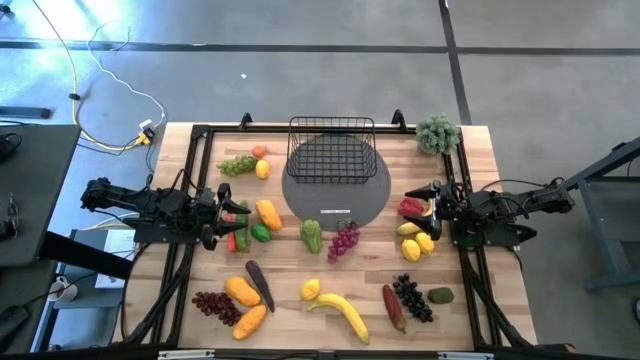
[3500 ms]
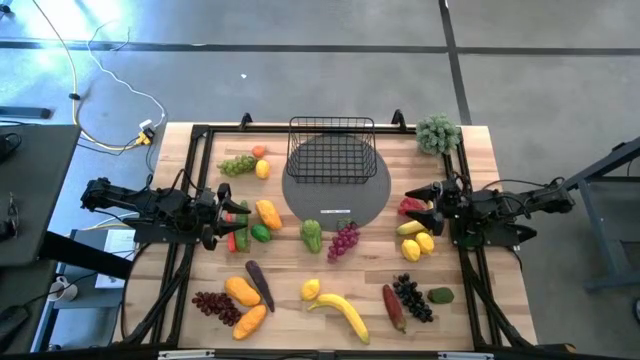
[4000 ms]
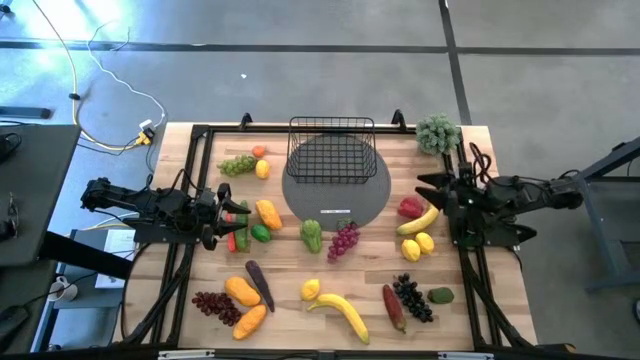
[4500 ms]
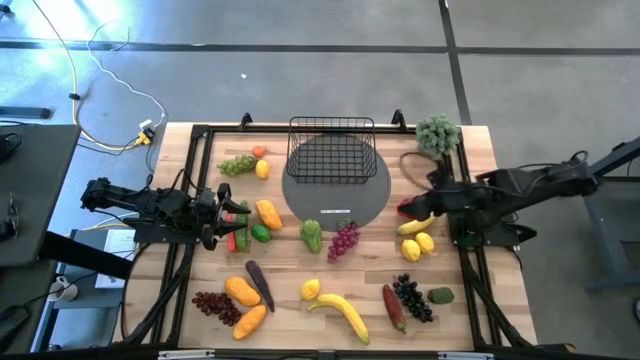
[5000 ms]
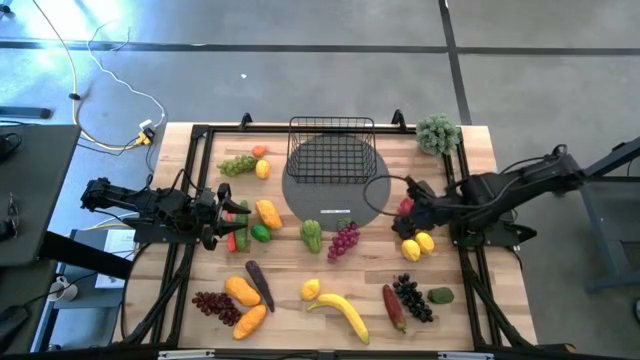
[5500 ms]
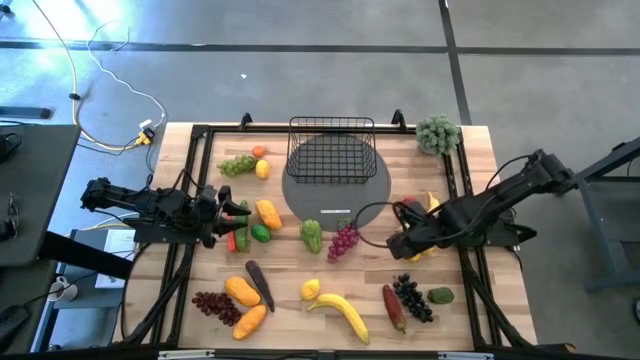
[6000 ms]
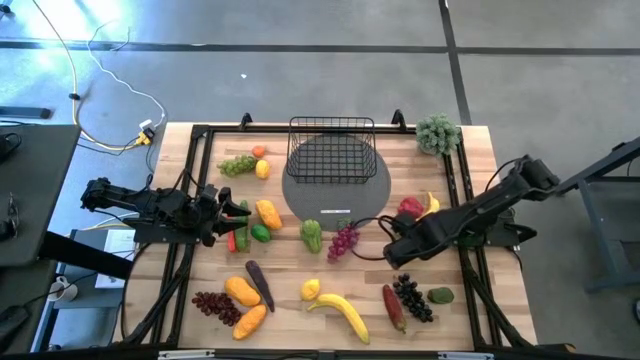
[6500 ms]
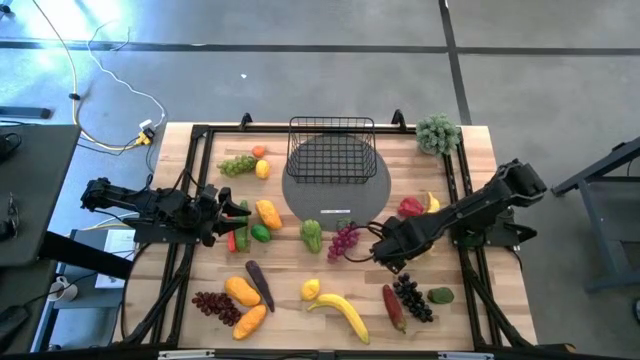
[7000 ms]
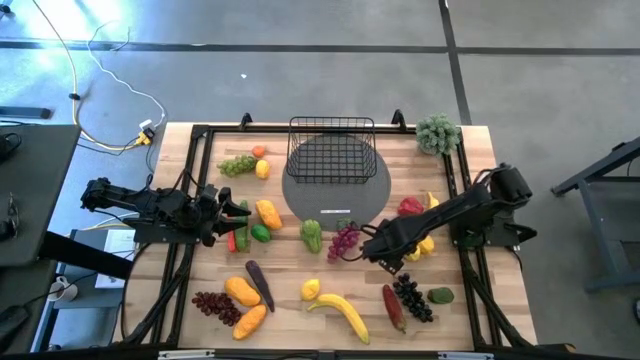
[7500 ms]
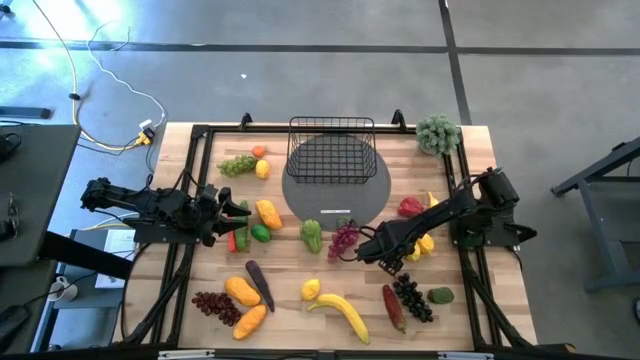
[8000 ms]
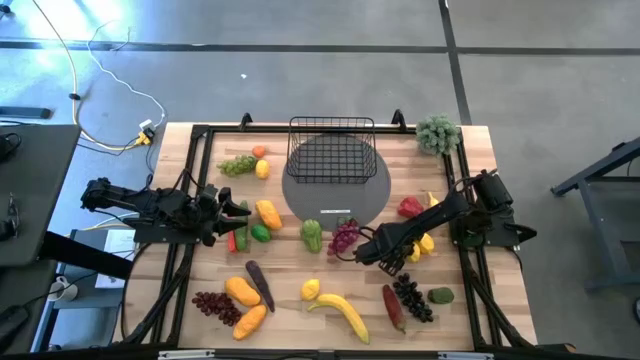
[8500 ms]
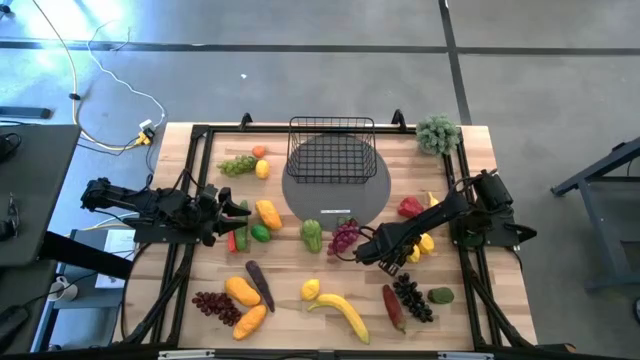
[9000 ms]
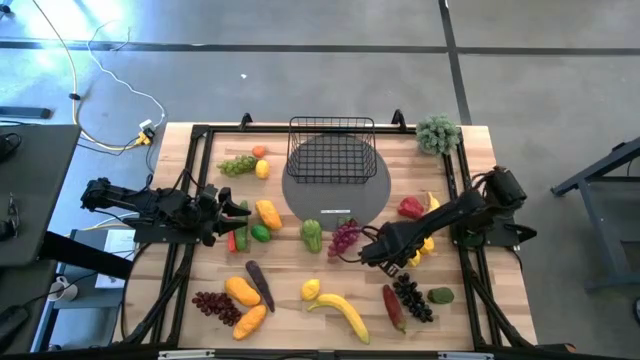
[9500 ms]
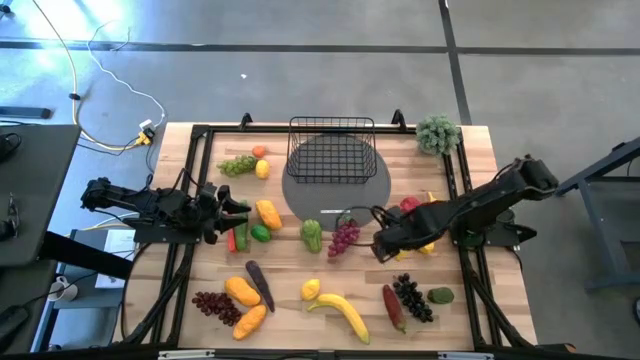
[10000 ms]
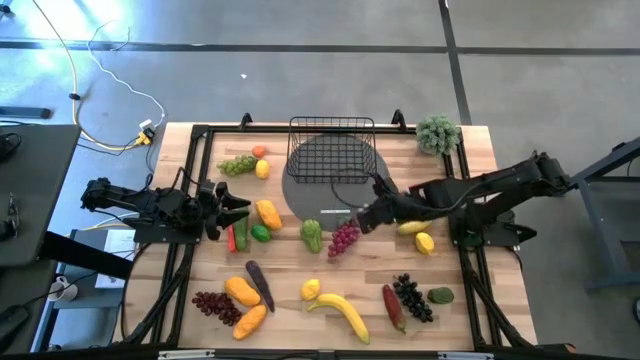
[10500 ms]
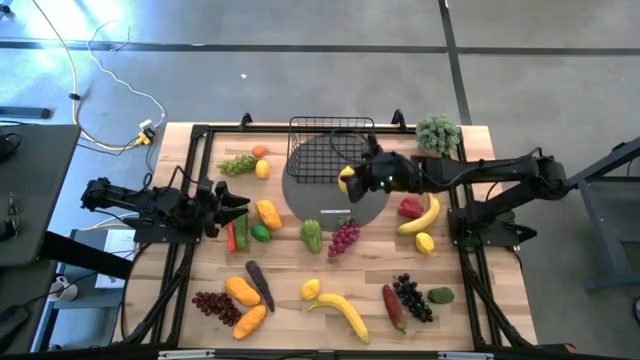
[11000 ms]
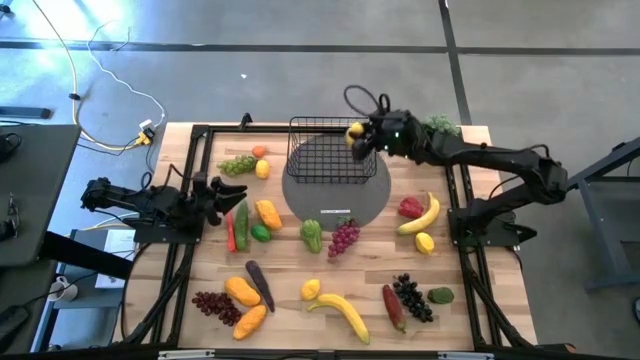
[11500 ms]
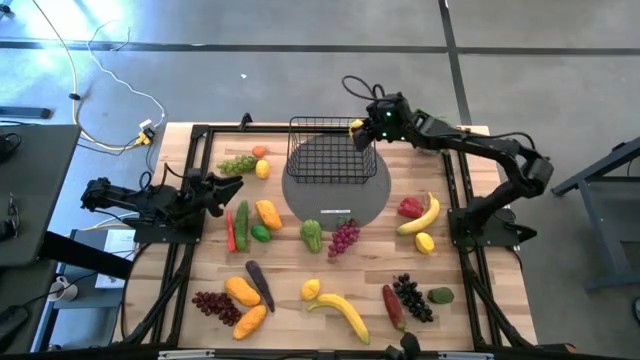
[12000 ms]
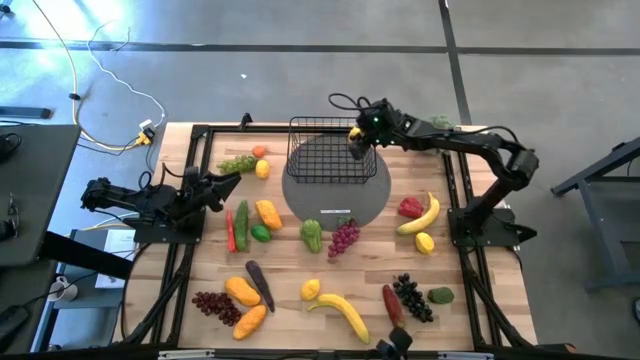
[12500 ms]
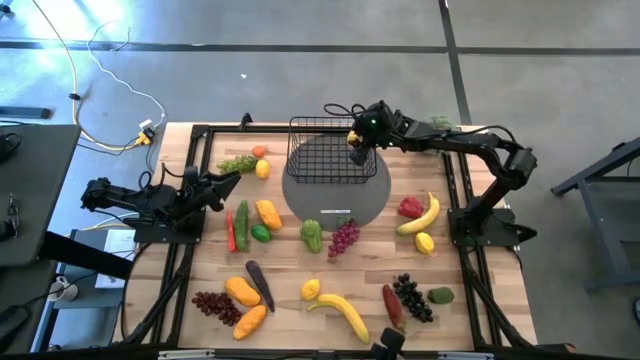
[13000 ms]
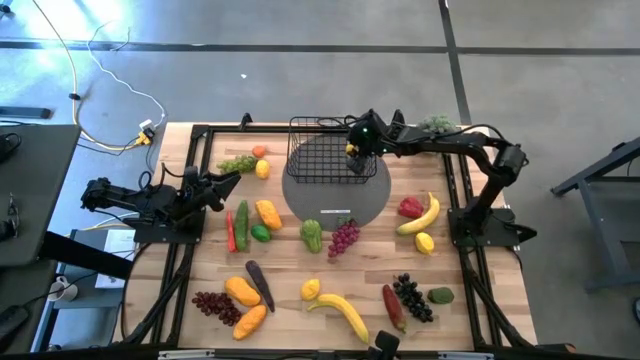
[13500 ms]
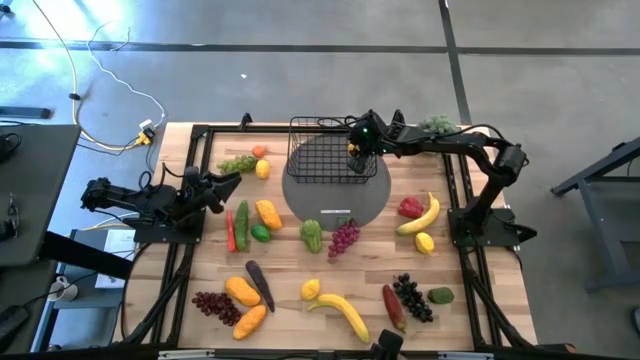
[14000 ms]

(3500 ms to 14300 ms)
Task: Build produce basket
Put the yellow lemon into the wire basket

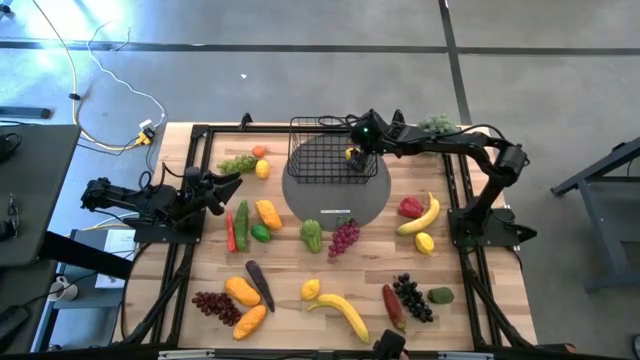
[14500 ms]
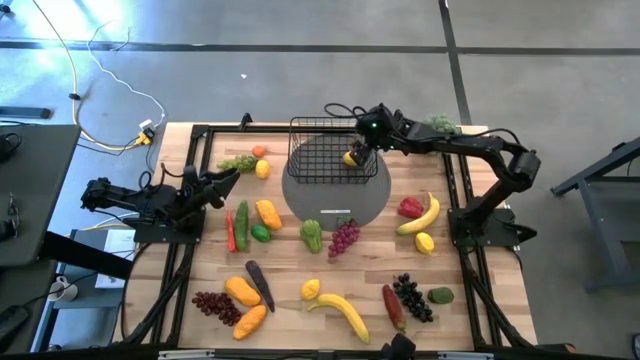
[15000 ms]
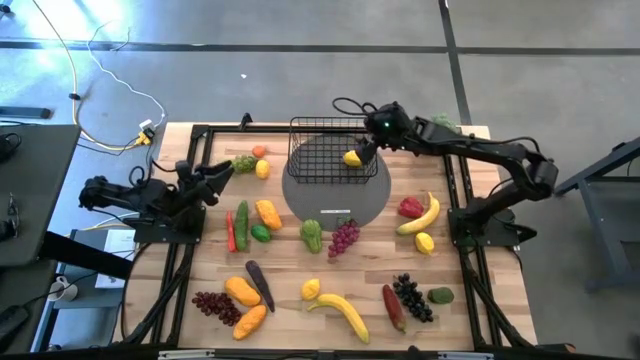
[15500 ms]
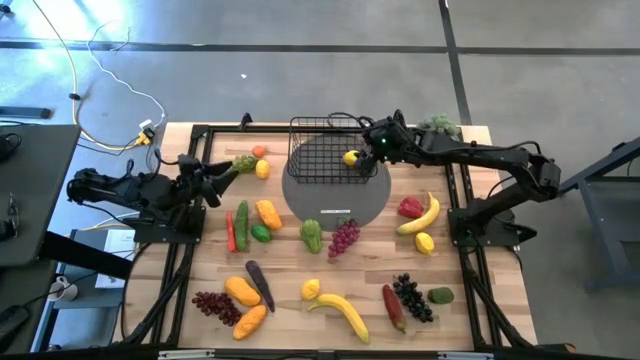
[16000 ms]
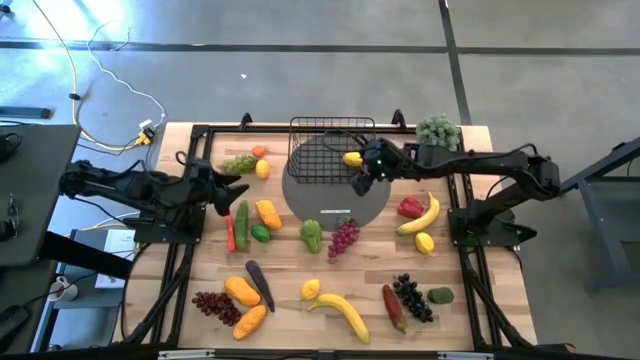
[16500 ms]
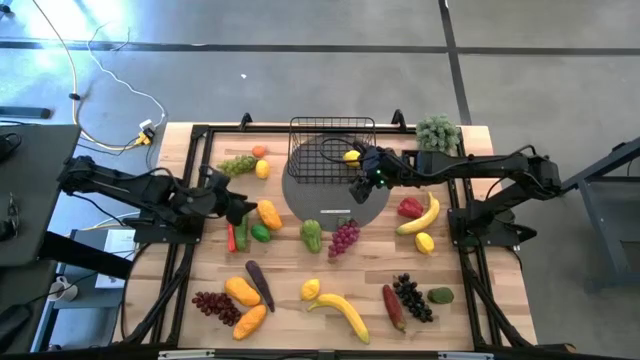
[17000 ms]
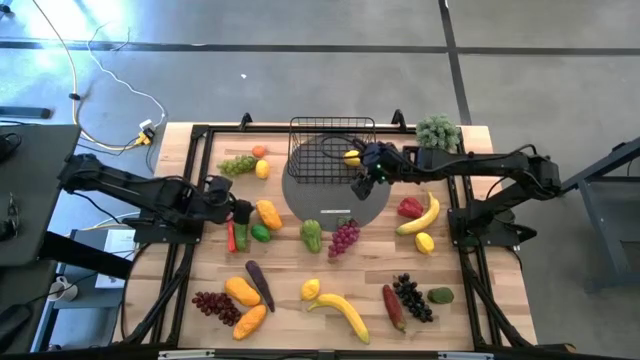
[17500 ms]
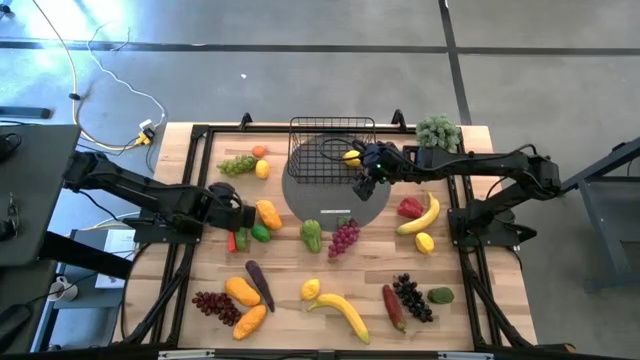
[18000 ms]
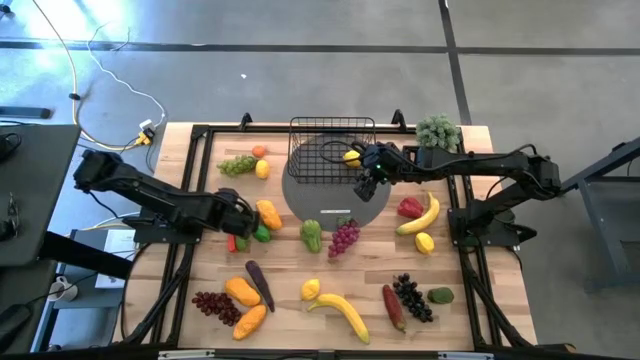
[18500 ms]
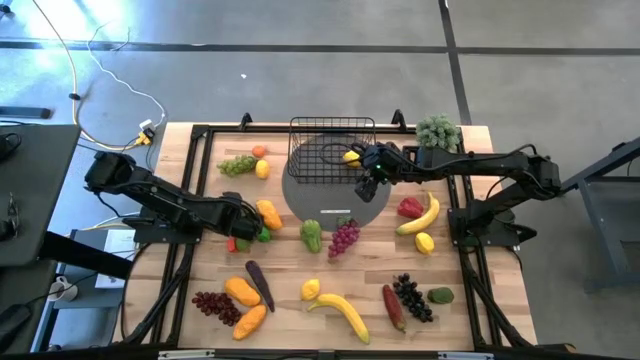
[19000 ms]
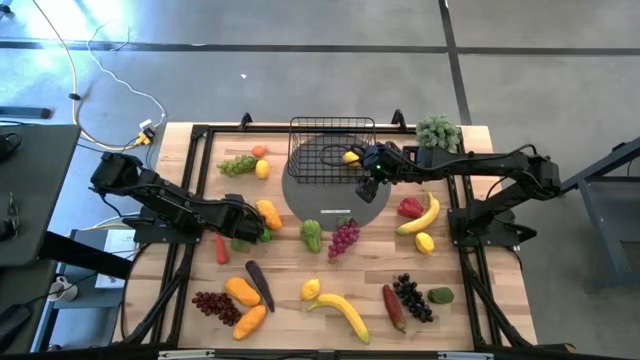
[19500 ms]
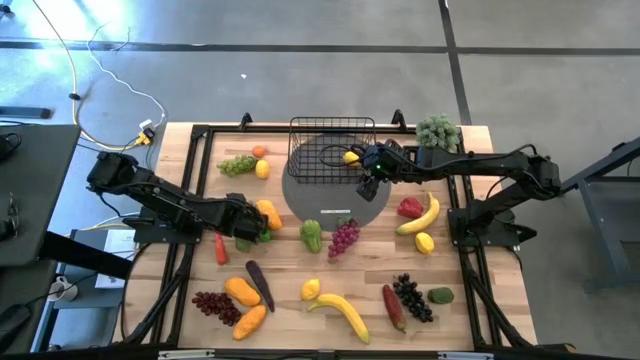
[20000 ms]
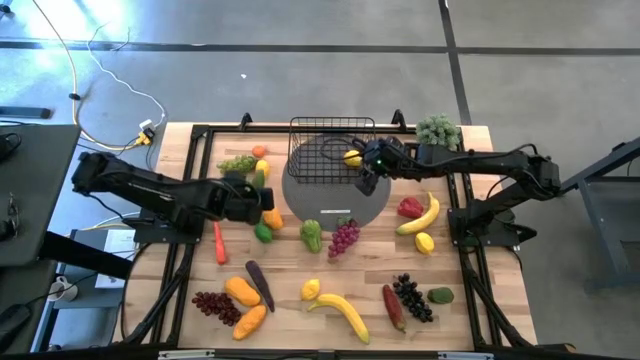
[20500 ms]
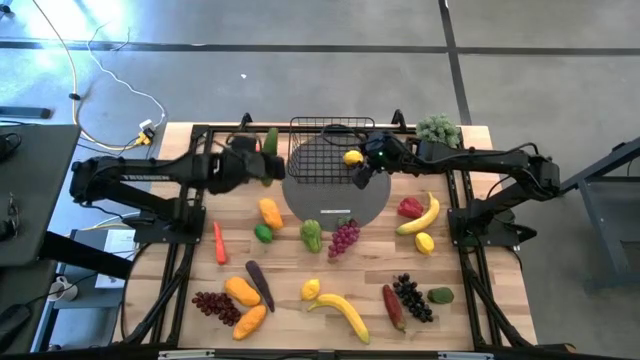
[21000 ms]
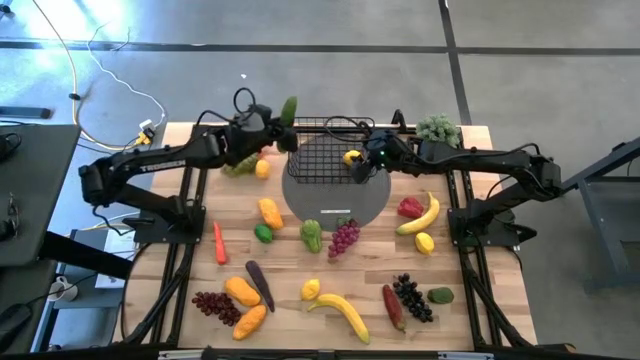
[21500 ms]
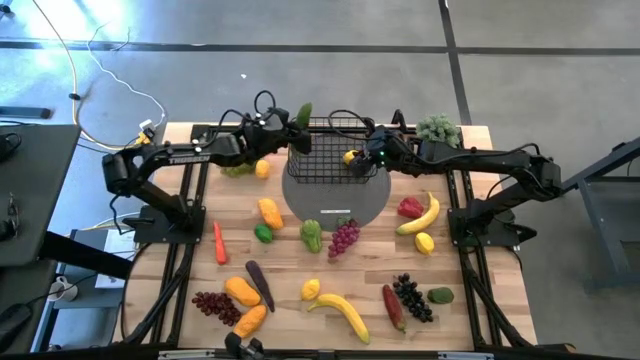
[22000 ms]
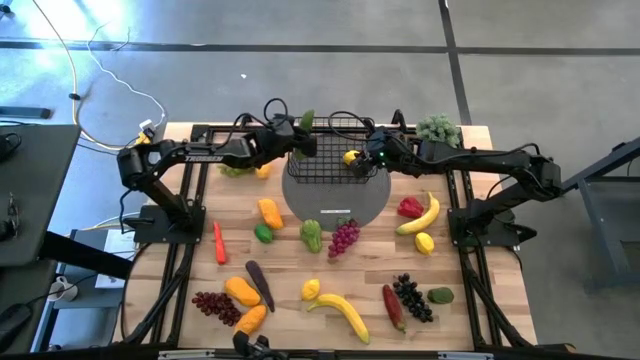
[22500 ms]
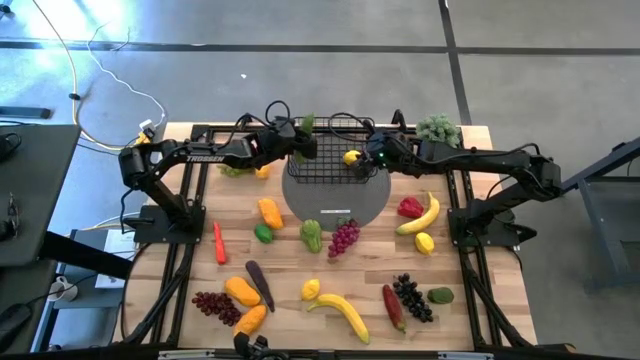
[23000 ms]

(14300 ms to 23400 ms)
Put the green cucumber into the wire basket

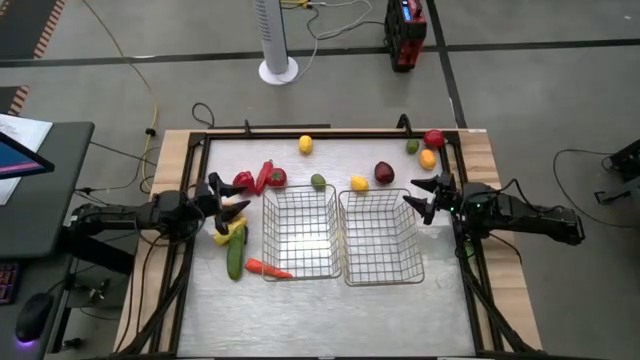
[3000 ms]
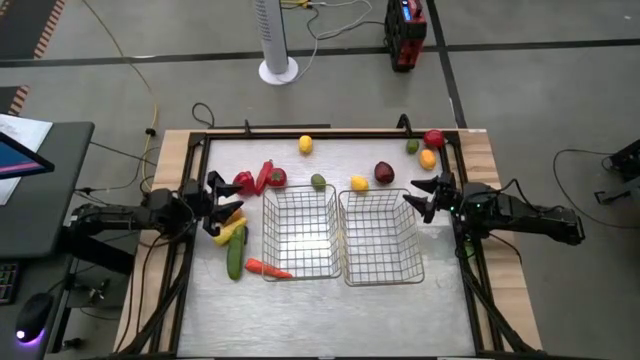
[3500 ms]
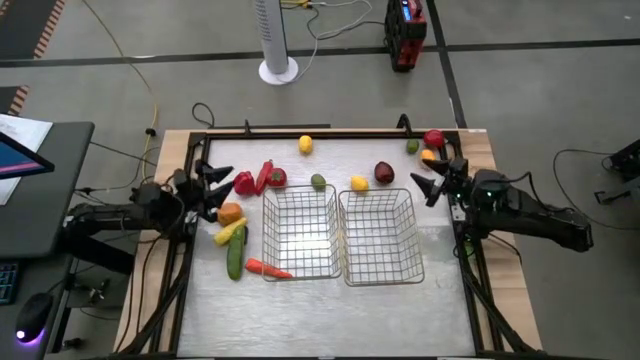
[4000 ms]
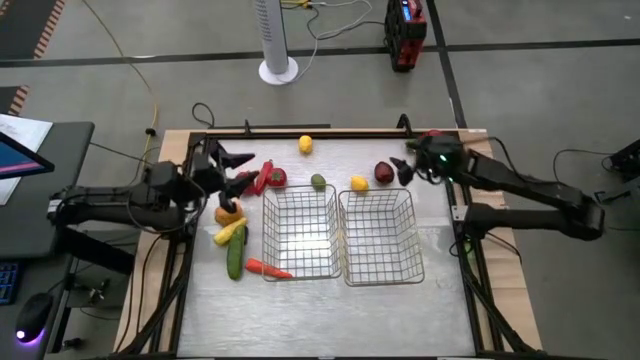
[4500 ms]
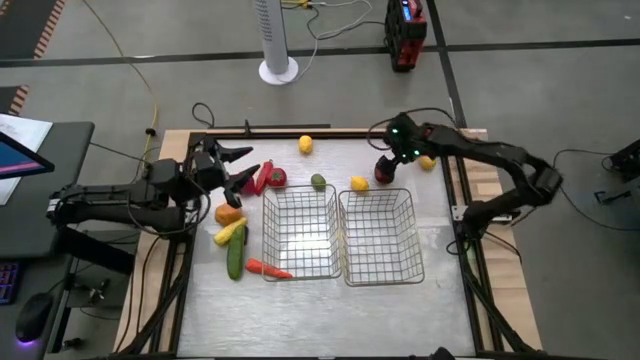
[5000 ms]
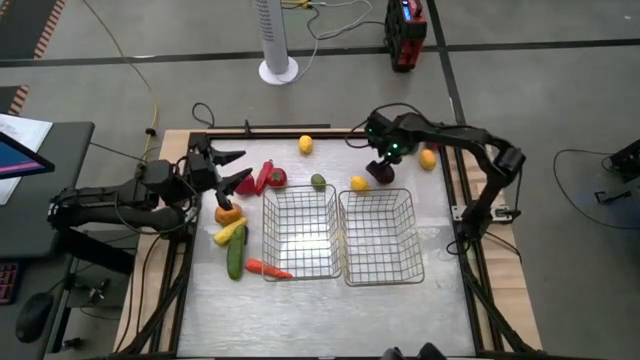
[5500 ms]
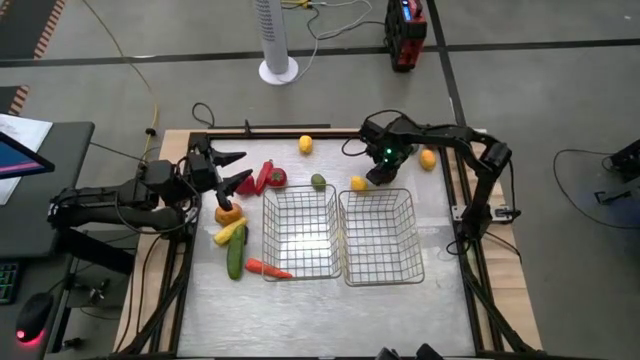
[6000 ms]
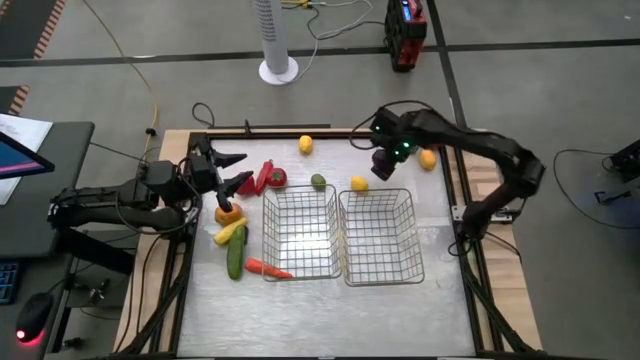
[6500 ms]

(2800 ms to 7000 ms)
Task: Sort produce into baskets
Put the apple into the right wire basket
